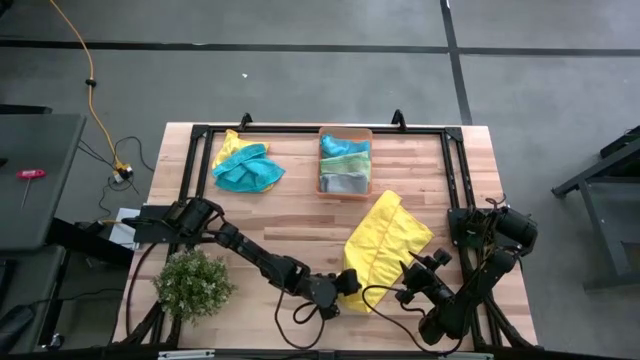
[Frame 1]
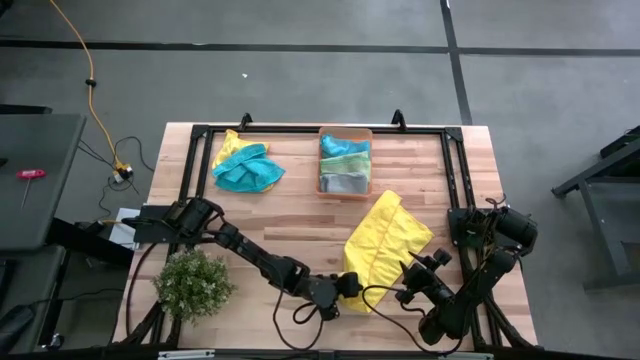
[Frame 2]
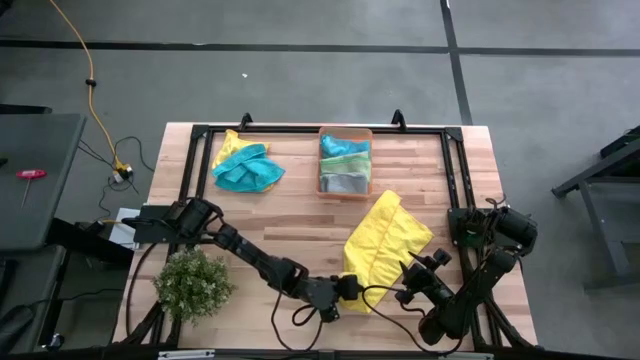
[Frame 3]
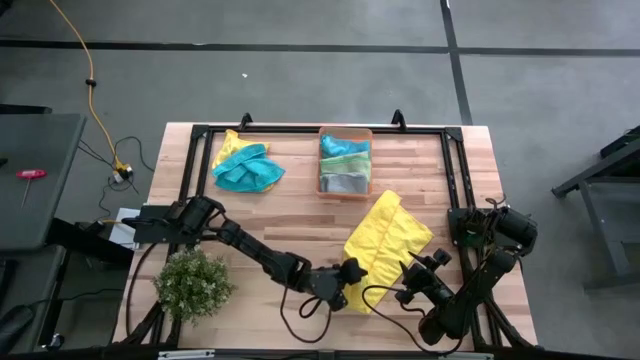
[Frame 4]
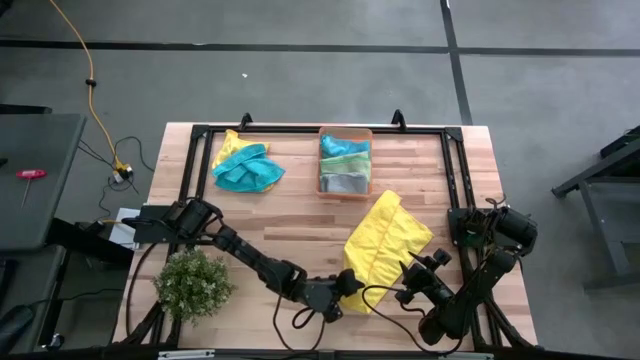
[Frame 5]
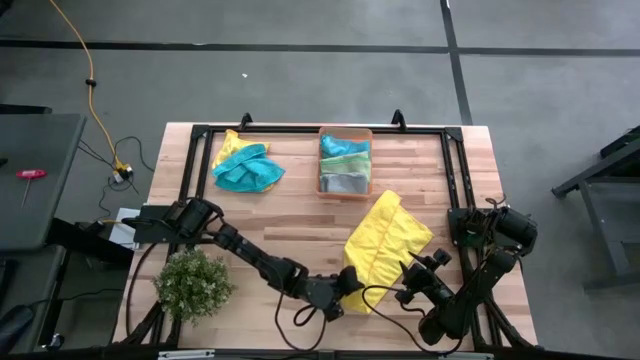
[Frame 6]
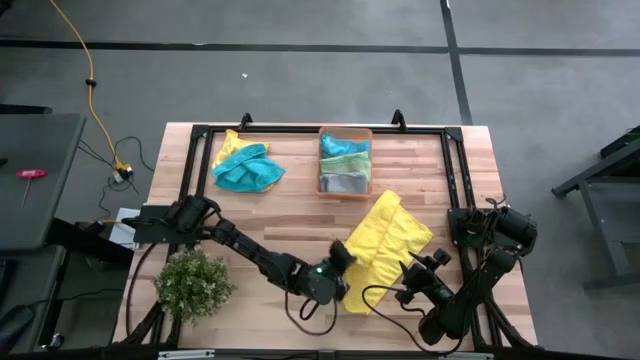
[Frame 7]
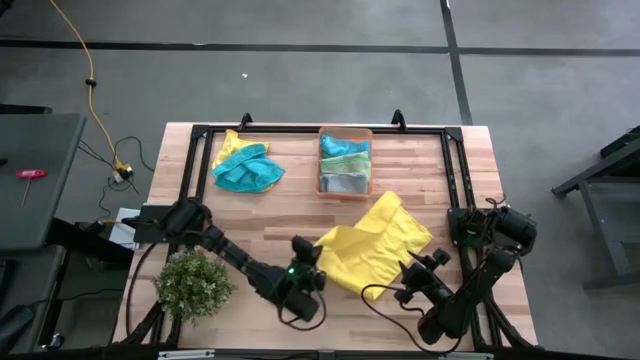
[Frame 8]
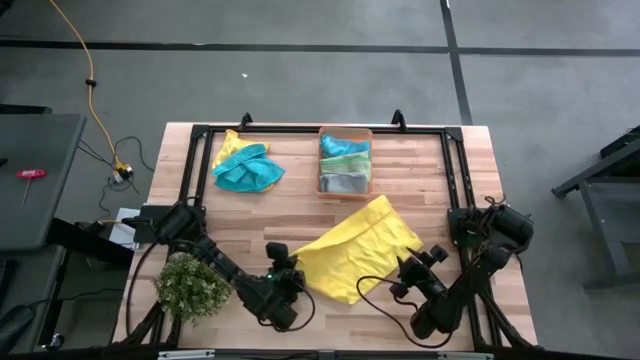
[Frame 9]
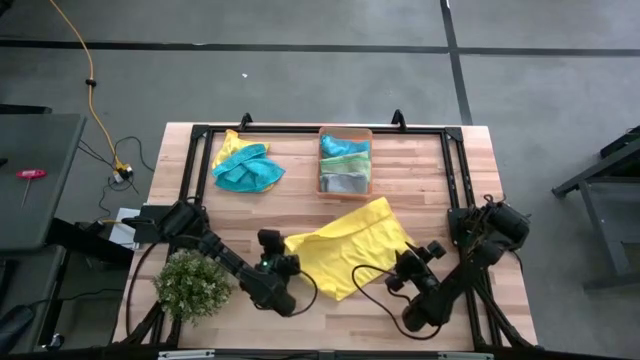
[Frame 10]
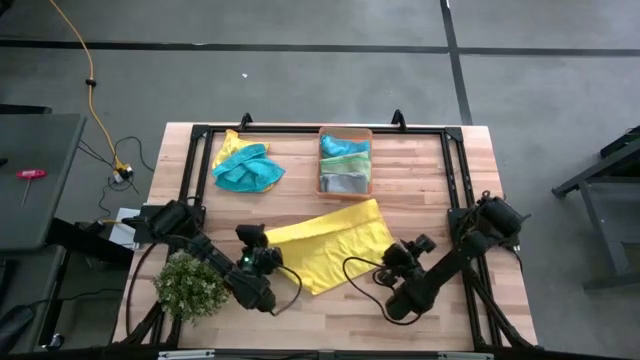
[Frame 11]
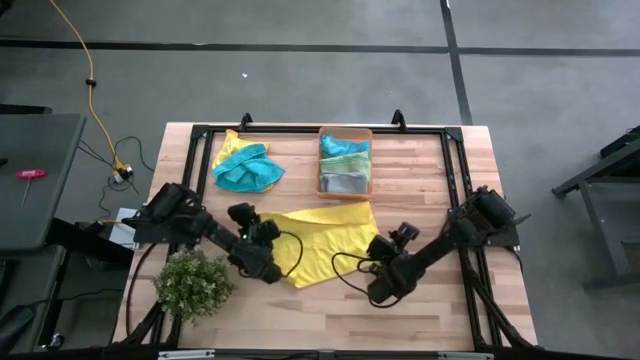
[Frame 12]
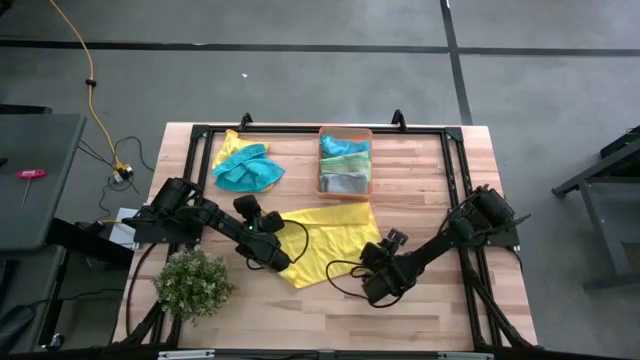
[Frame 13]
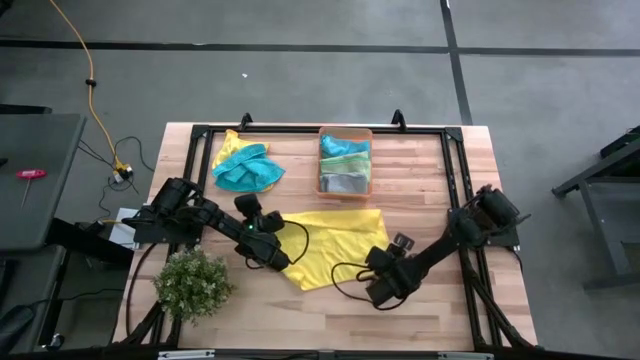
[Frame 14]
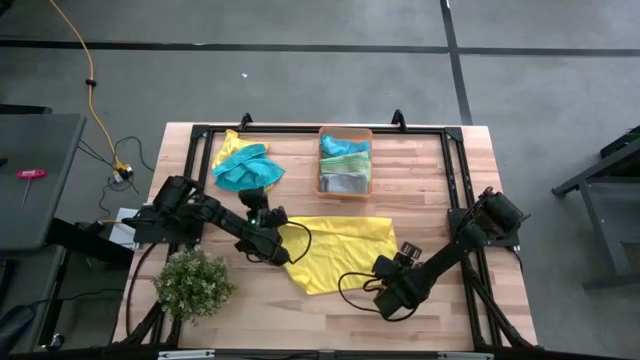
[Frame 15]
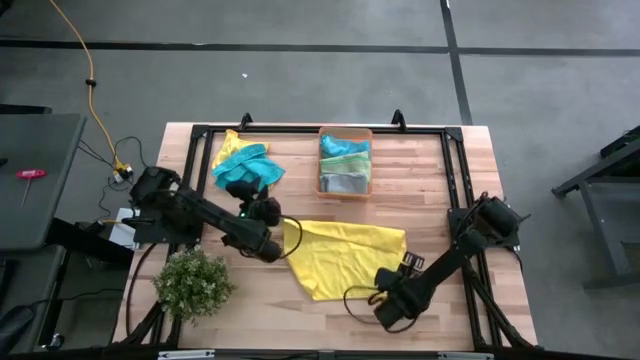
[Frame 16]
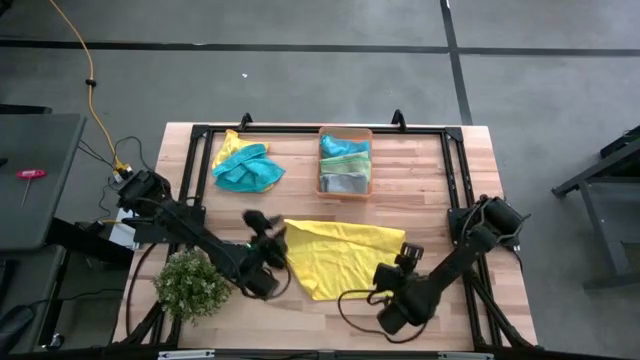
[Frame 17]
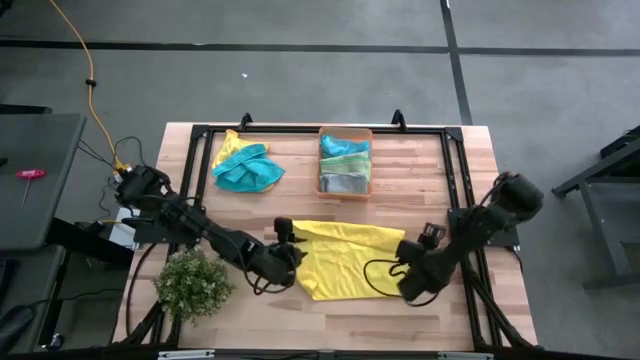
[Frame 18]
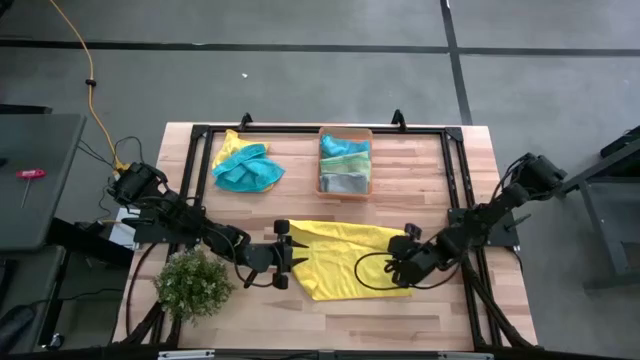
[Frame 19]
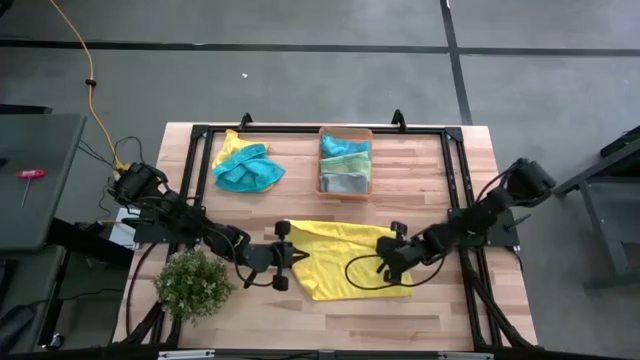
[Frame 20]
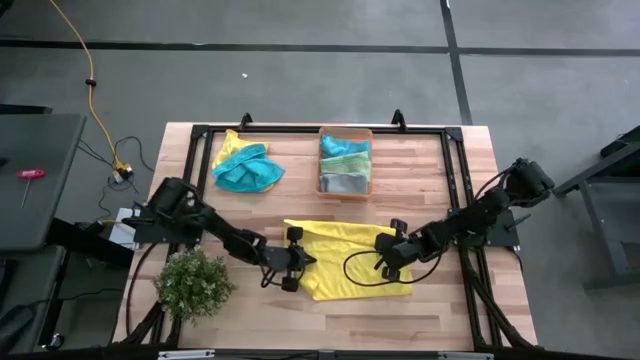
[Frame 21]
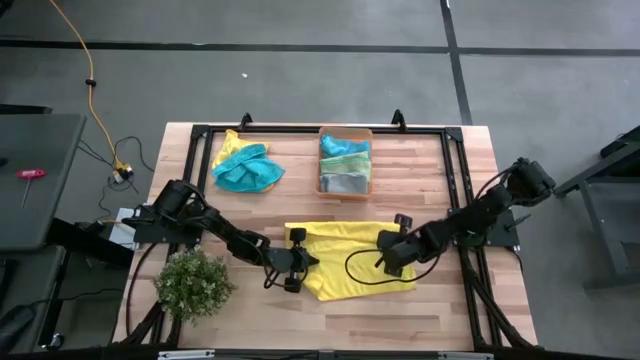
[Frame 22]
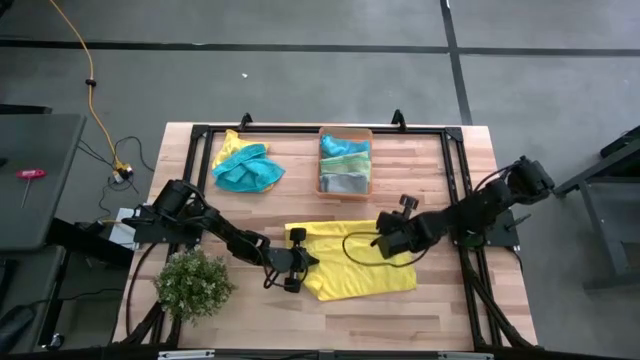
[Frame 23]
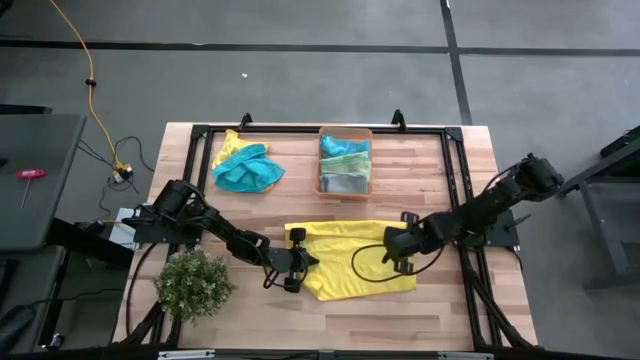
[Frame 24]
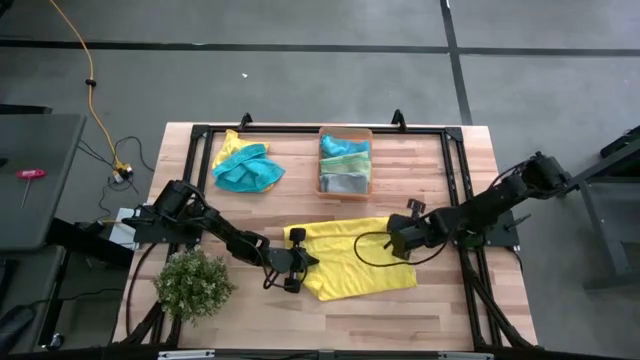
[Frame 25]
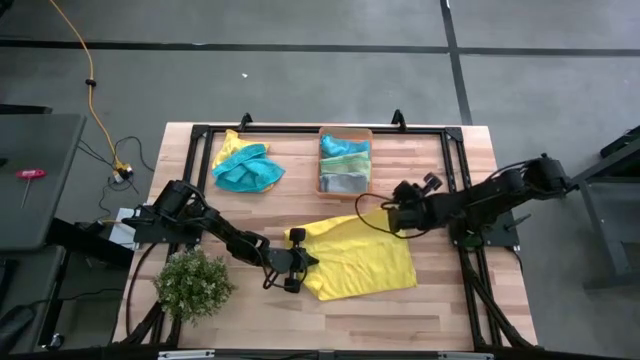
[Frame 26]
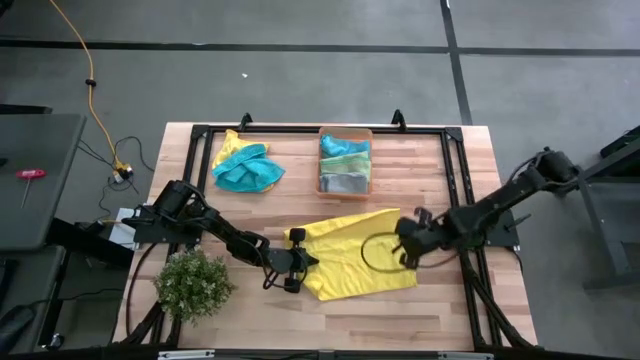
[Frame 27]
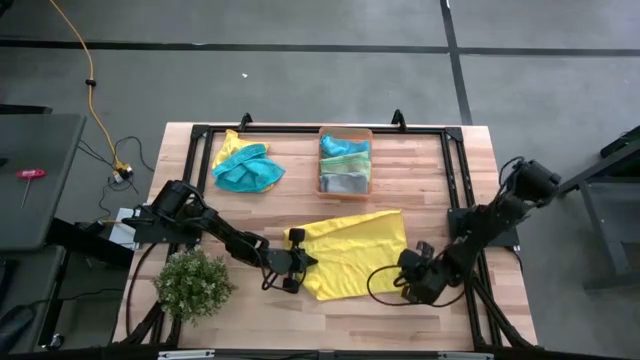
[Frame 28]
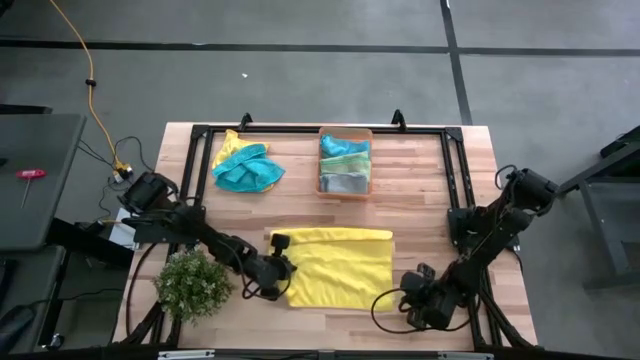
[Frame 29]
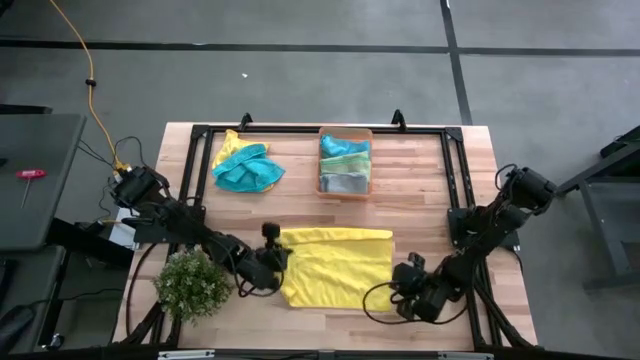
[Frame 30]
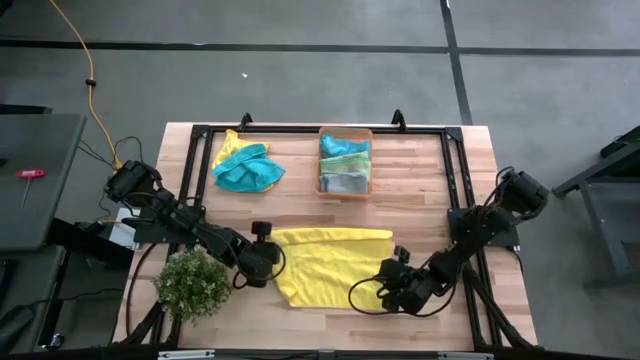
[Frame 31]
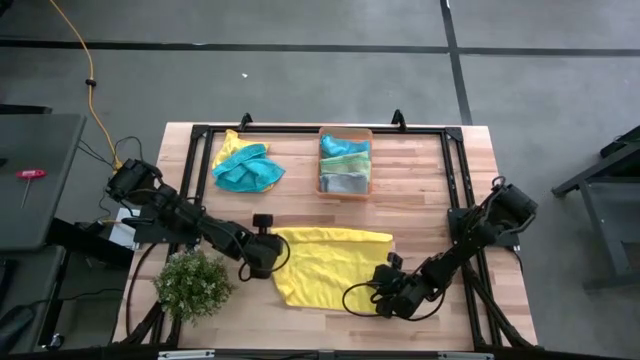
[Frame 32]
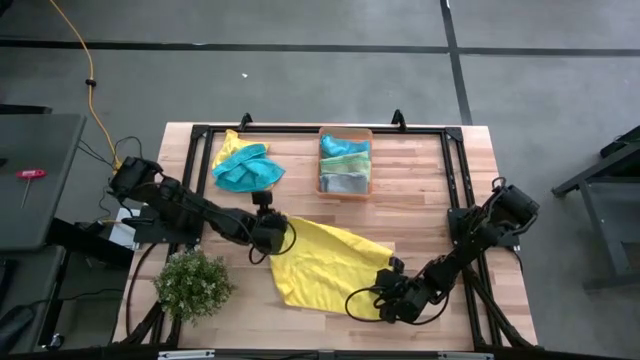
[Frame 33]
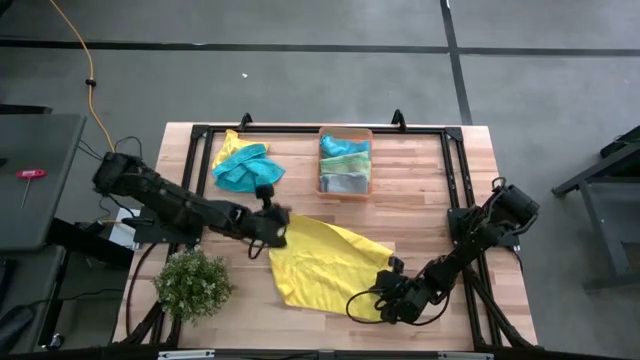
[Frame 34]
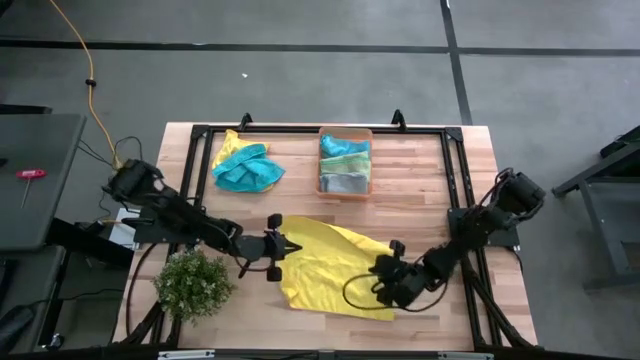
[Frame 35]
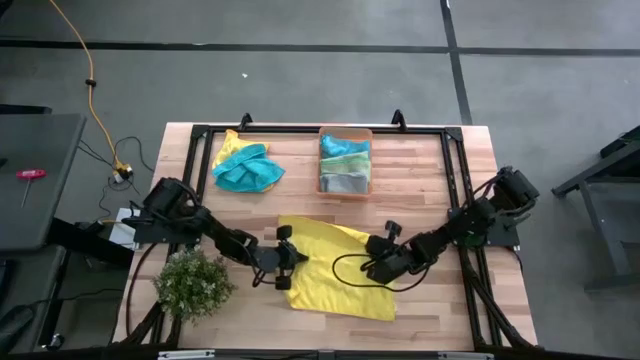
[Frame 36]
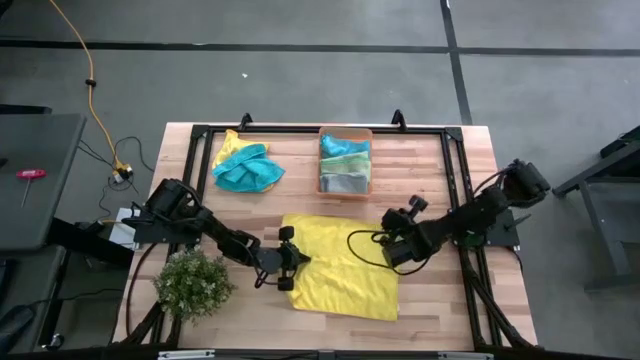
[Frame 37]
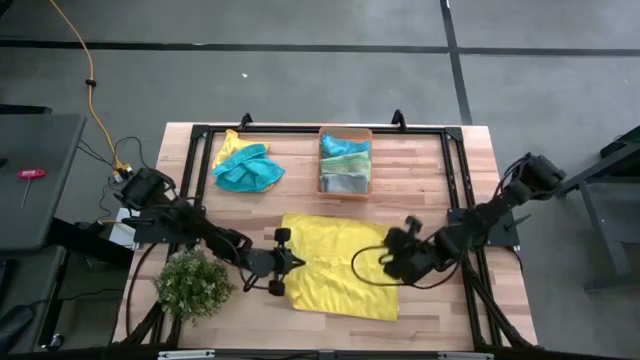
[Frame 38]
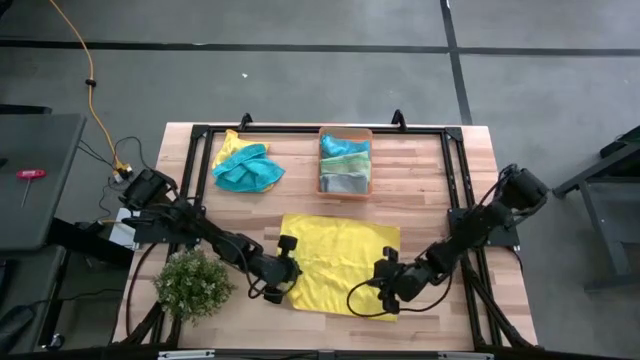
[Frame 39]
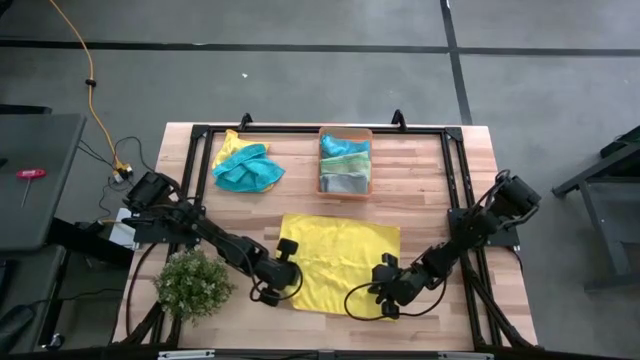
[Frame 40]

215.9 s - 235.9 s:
Task: Fold microfiber towels
Fold the right yellow microfiber cloth
